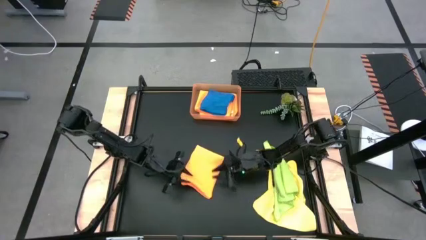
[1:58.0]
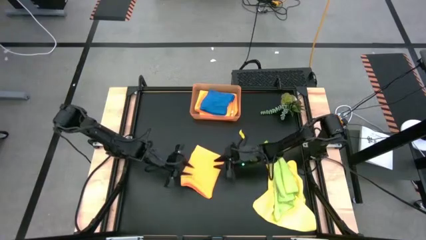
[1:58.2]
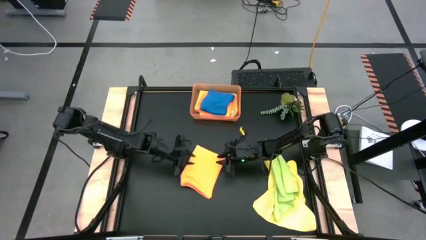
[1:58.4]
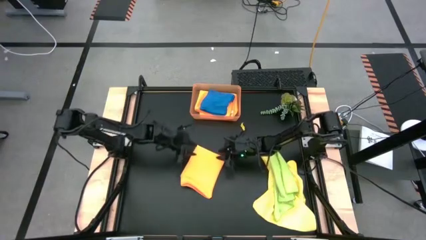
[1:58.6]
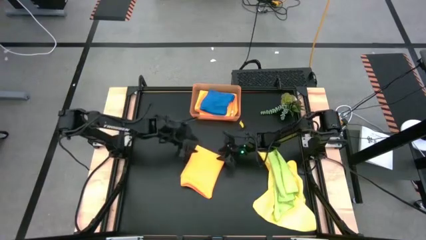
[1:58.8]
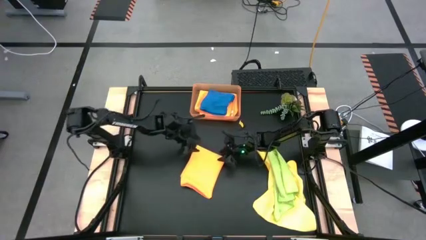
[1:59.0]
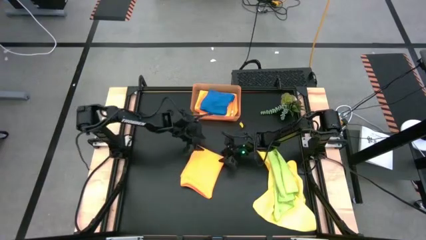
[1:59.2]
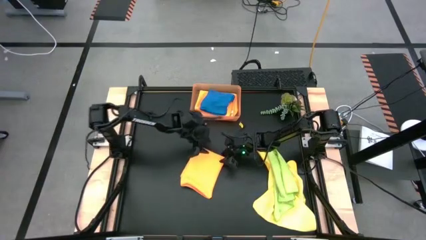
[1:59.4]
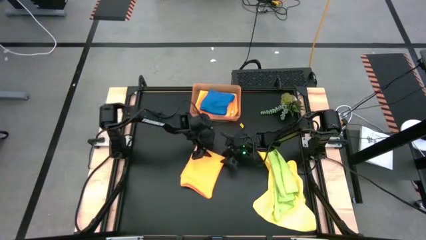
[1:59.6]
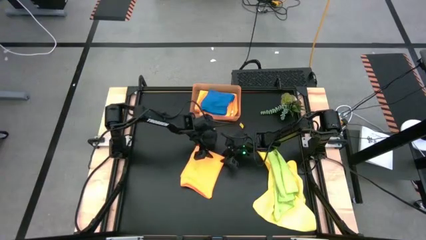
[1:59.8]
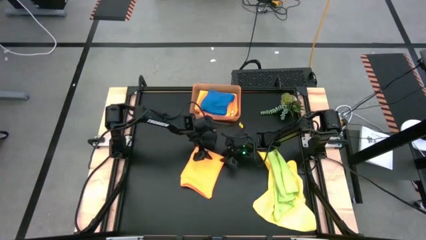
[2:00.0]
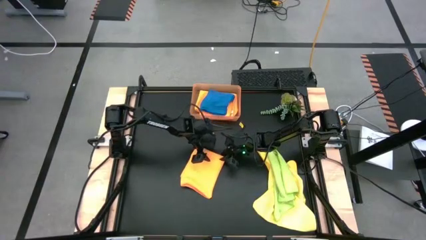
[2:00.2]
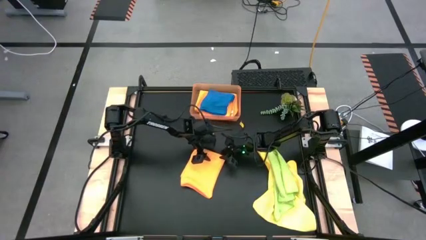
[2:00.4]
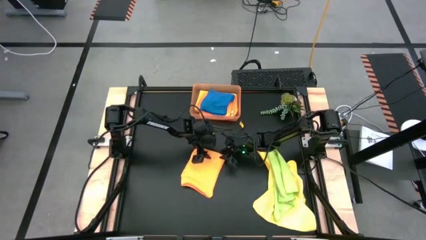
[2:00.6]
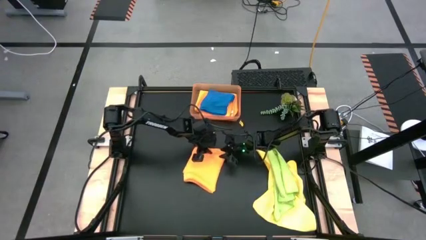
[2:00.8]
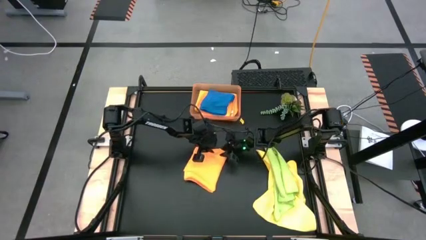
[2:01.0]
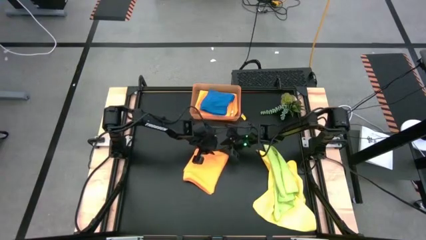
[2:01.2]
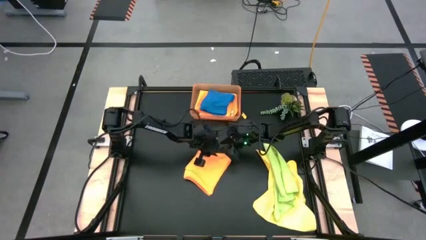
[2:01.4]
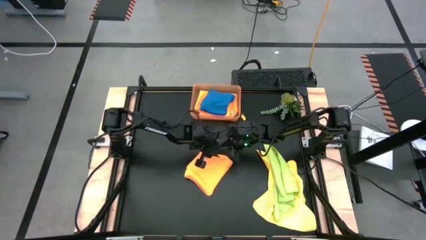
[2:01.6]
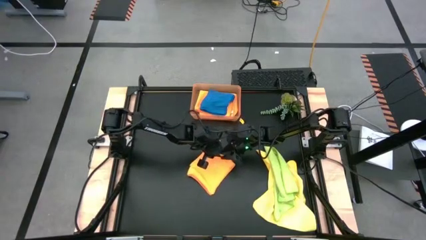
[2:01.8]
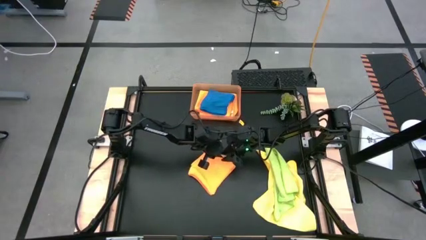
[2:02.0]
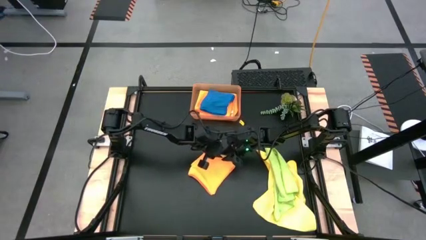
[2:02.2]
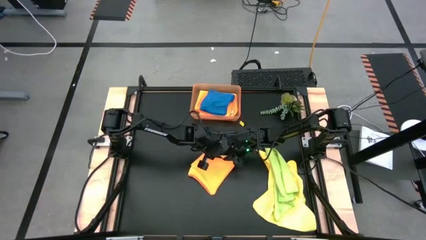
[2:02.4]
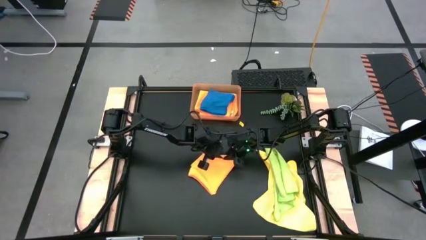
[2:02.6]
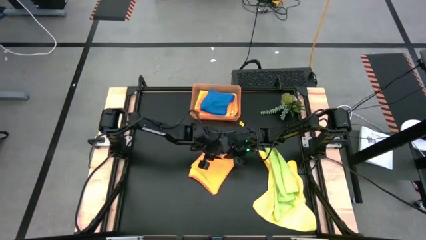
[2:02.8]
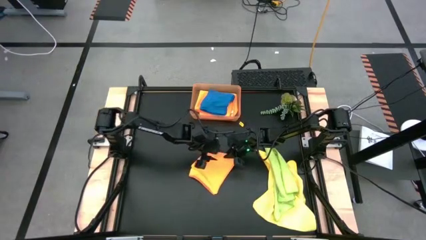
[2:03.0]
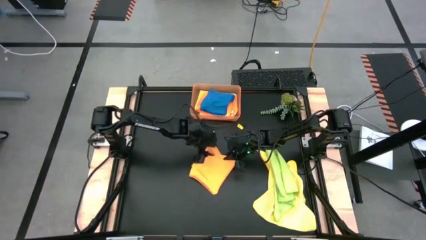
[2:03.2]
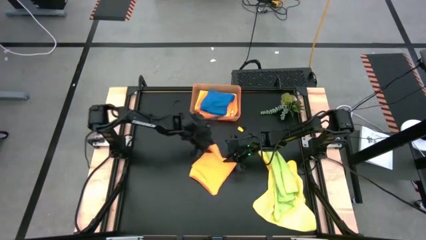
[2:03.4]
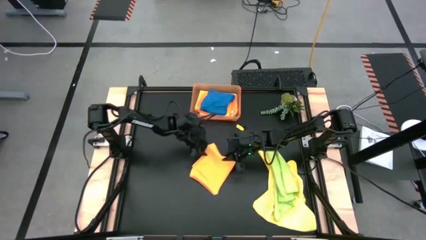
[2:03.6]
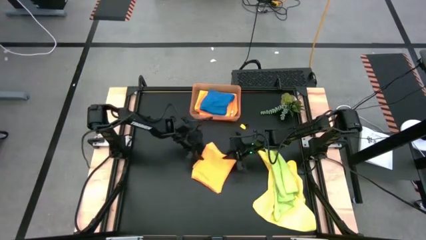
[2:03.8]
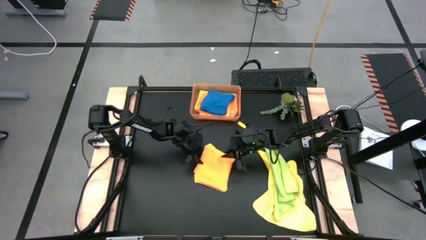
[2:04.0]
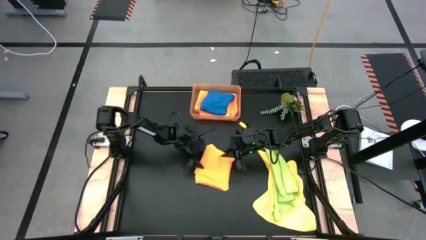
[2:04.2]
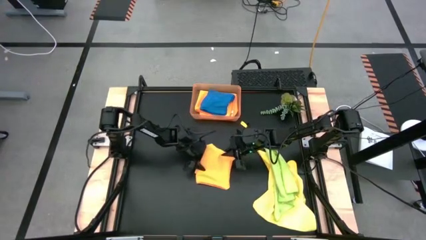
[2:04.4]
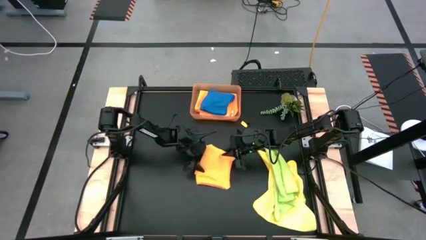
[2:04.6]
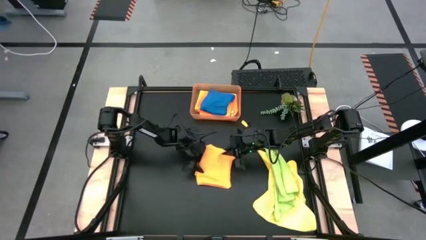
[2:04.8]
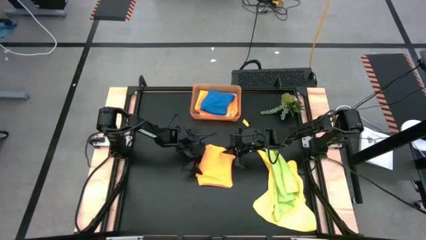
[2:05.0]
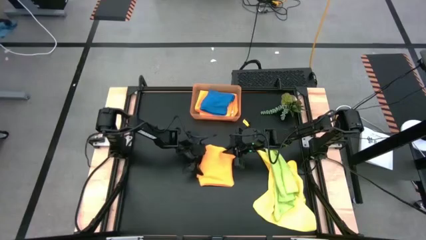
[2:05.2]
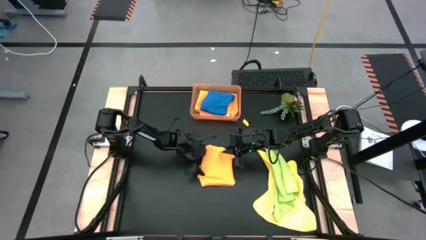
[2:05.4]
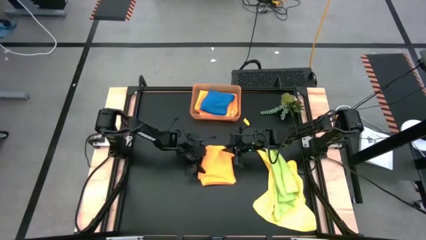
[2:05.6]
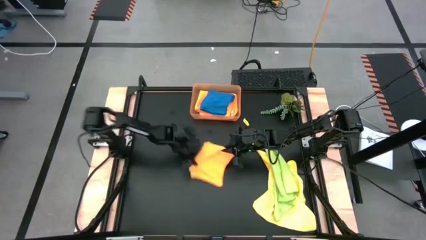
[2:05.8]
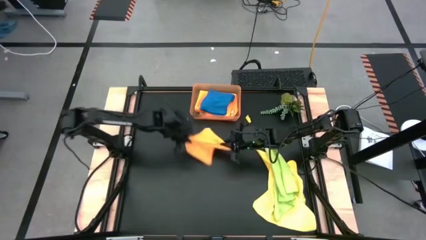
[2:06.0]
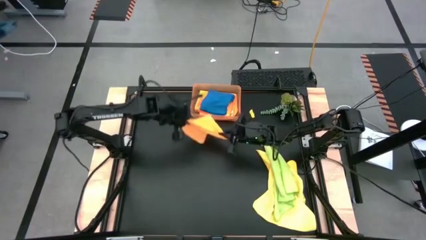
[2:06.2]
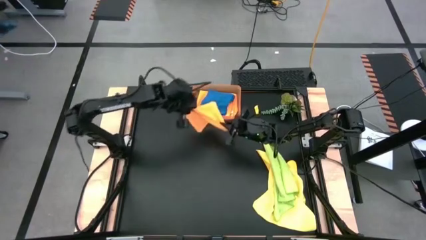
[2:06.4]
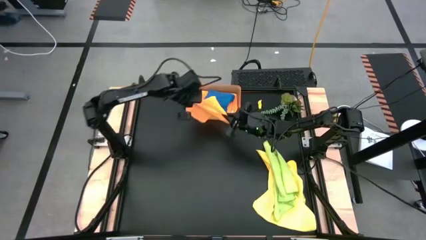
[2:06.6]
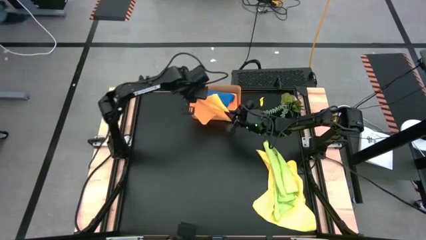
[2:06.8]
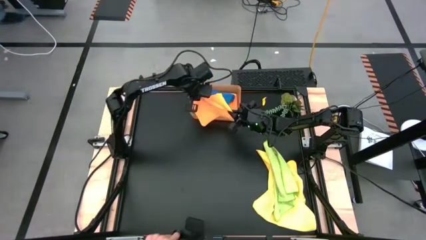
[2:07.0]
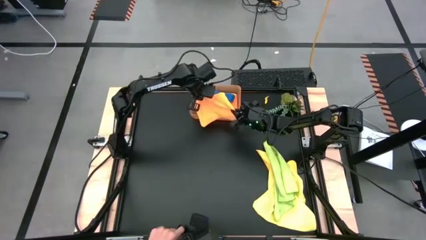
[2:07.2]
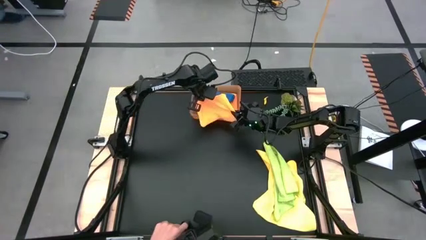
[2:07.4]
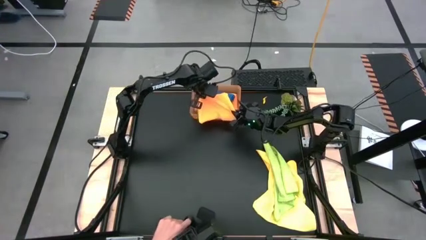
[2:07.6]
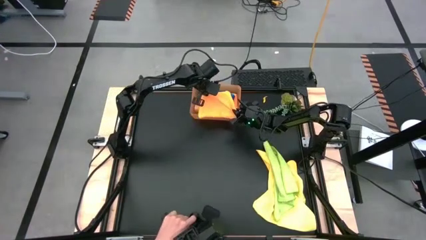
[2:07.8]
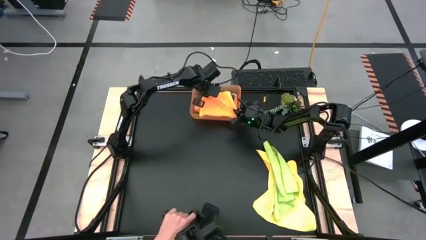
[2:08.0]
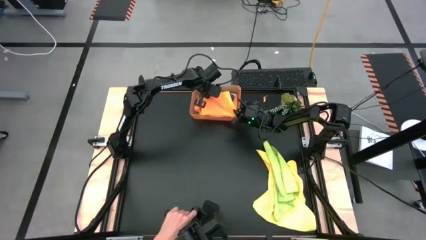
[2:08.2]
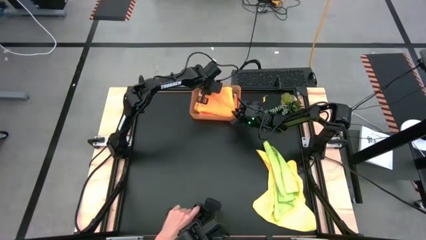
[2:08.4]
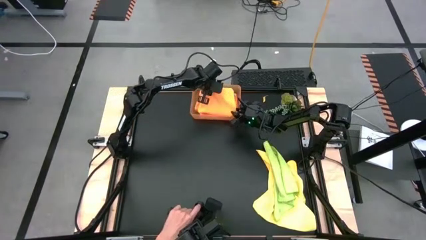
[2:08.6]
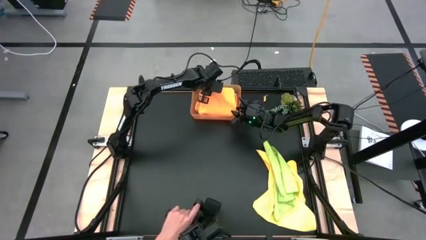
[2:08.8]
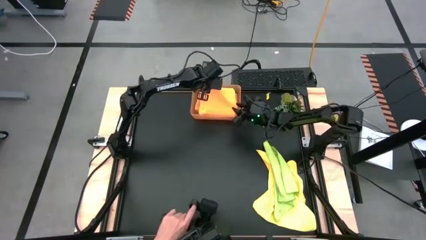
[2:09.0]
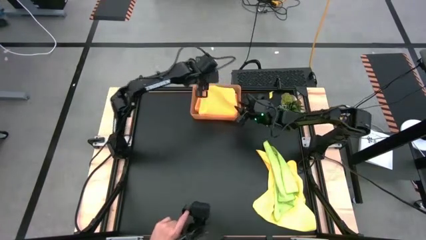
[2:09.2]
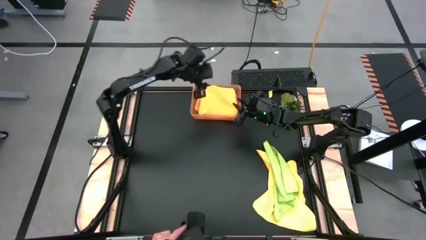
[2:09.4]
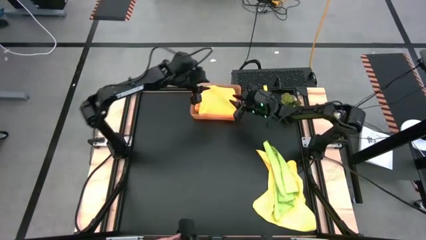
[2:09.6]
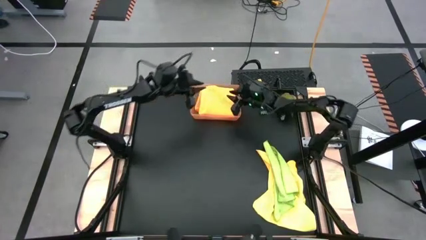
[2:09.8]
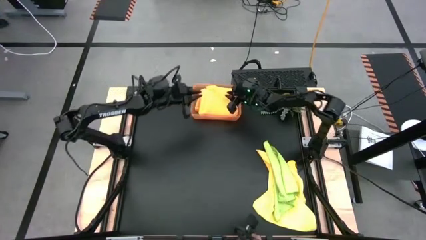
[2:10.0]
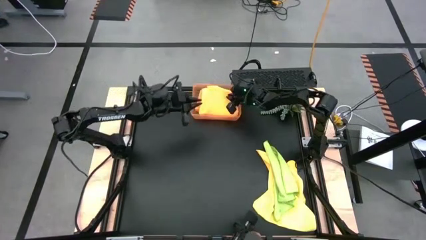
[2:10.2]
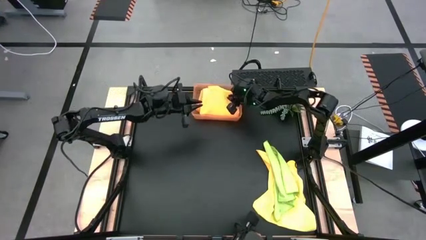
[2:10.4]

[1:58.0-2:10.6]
Task: Fold microfiber towels
Put the folded orange towel into the orange bin

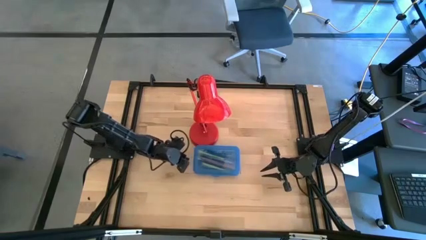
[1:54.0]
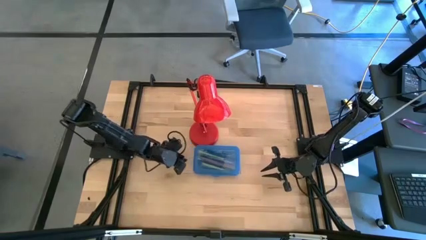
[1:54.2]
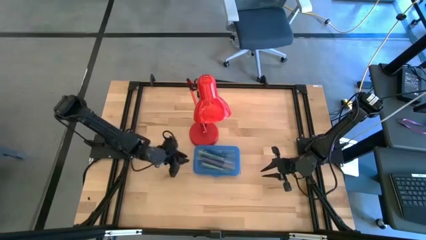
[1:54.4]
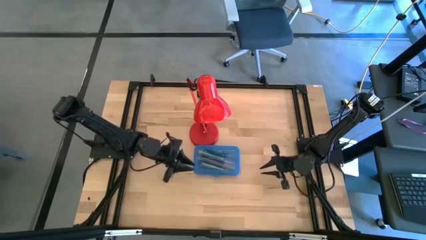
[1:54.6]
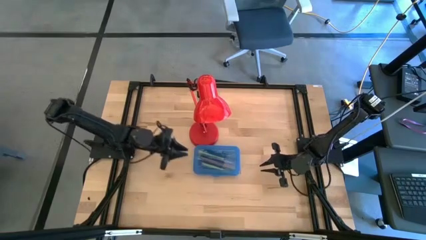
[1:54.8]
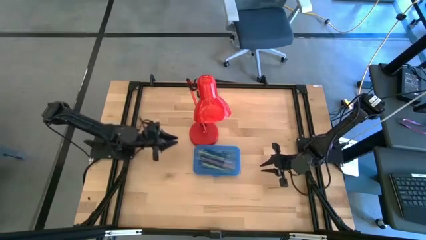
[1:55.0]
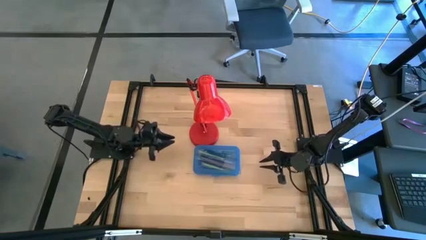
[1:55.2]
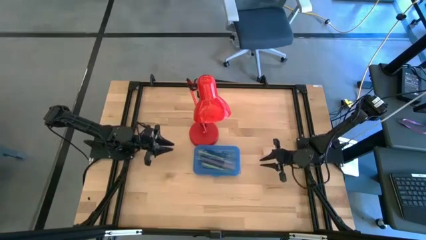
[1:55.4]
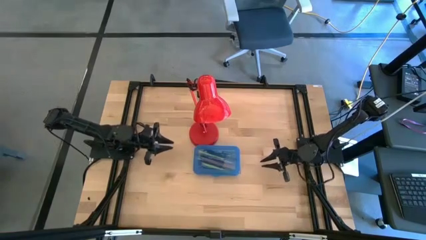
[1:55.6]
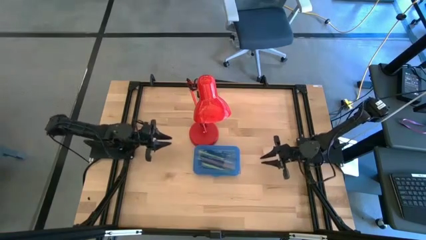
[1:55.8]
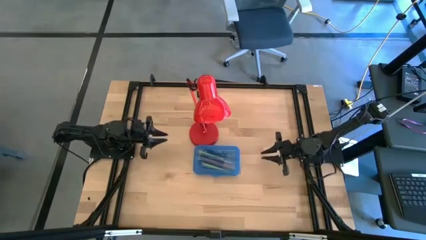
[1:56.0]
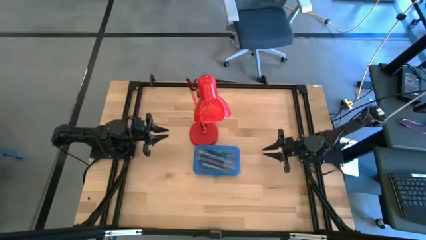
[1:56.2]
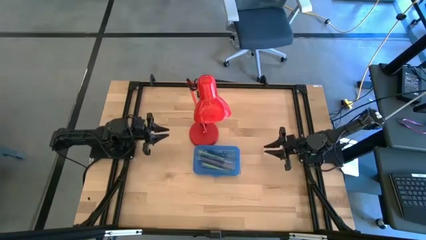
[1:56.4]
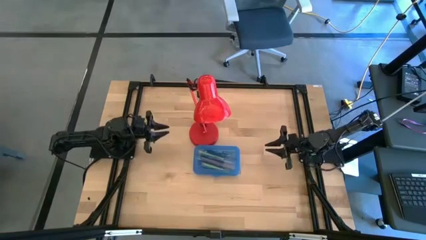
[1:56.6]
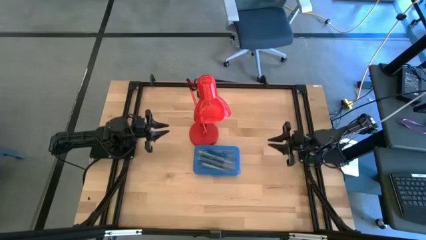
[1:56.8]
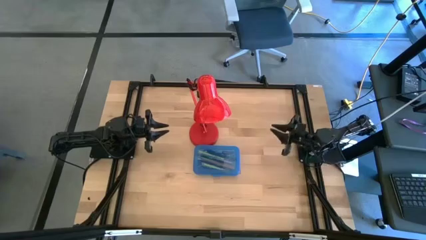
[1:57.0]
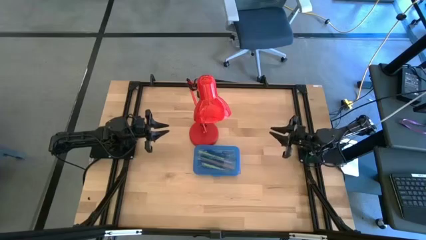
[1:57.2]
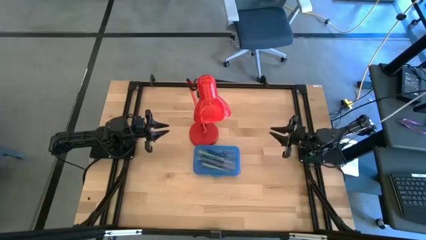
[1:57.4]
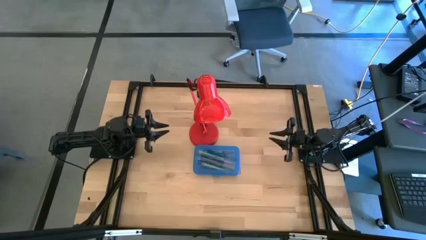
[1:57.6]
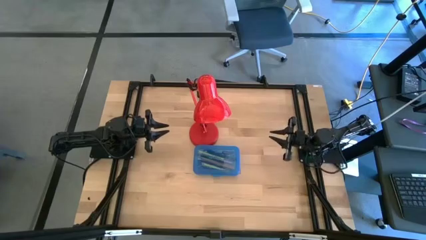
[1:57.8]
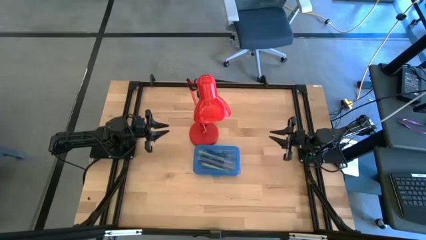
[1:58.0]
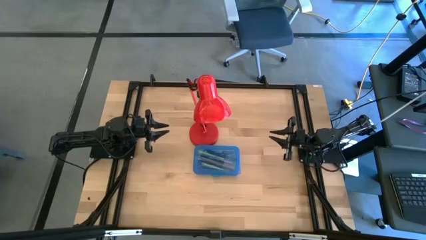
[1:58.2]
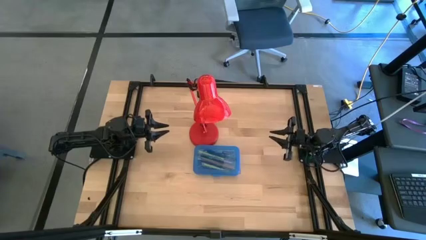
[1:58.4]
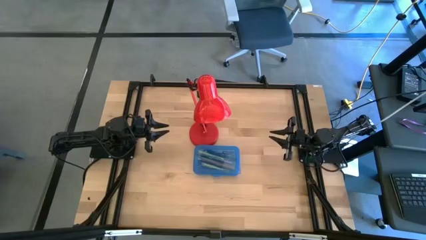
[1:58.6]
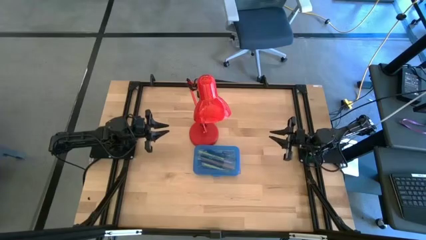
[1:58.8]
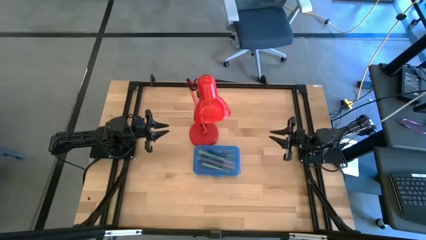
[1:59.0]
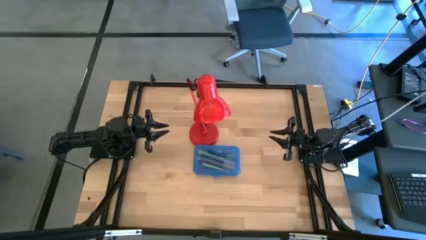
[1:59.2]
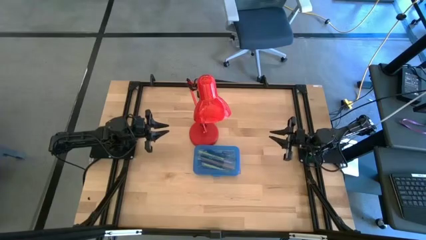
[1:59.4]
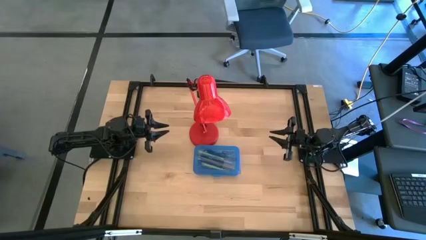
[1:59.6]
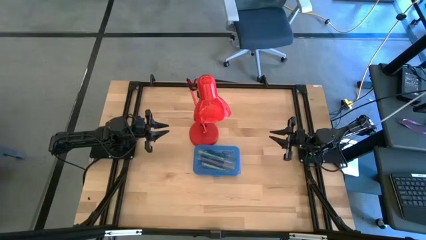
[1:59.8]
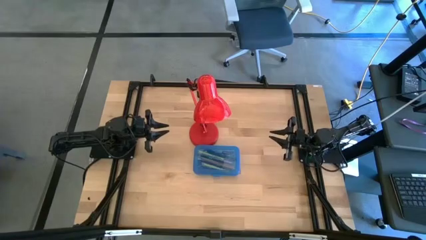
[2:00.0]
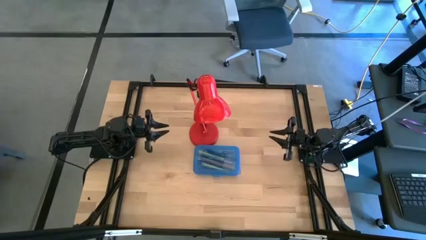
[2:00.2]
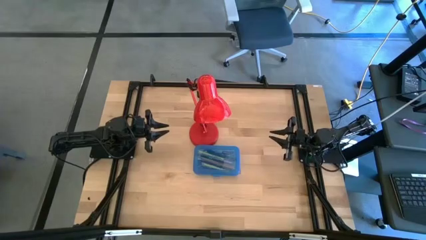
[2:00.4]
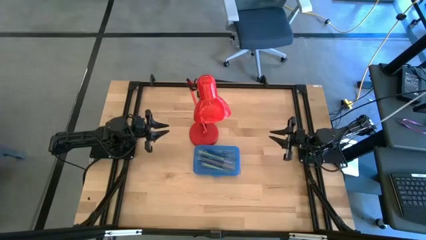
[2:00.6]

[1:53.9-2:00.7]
Task: Pick & place school supplies into a supply box
Return to Home Position
